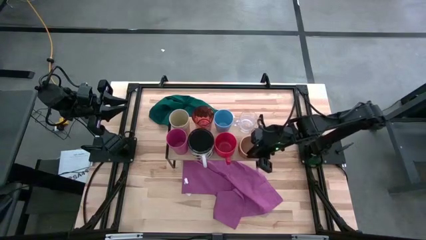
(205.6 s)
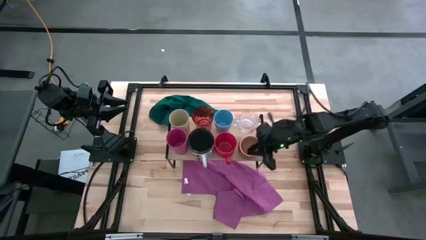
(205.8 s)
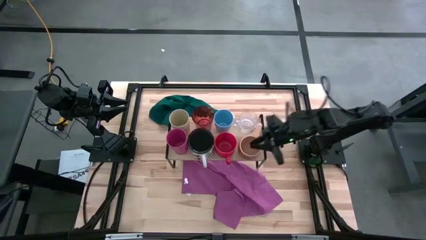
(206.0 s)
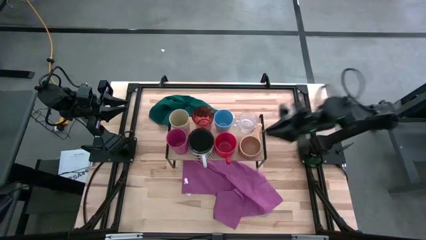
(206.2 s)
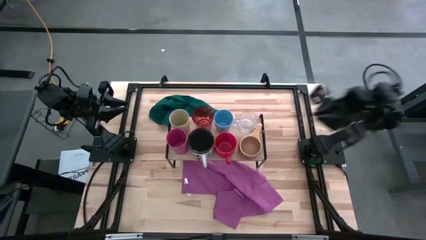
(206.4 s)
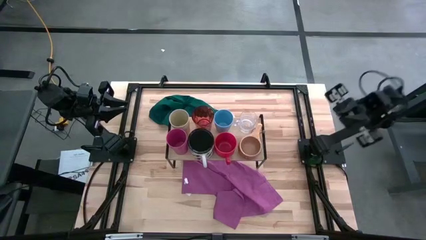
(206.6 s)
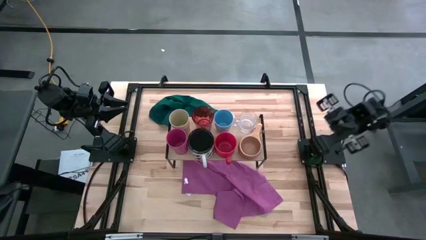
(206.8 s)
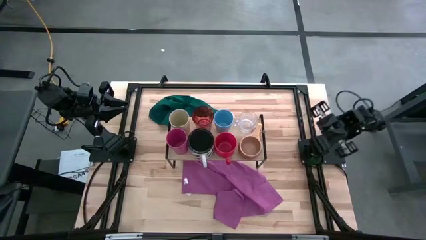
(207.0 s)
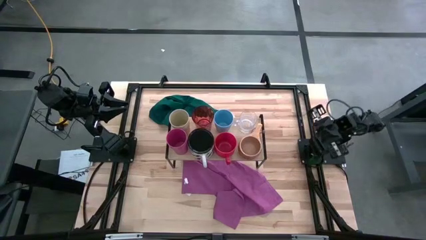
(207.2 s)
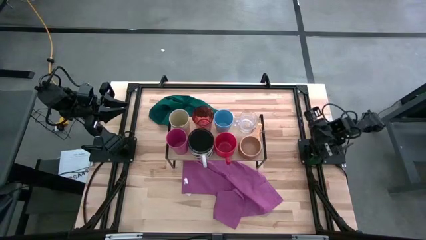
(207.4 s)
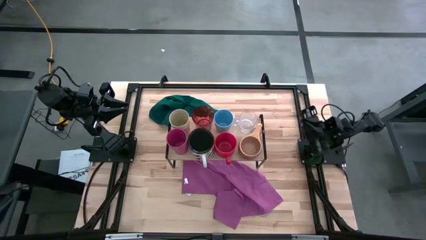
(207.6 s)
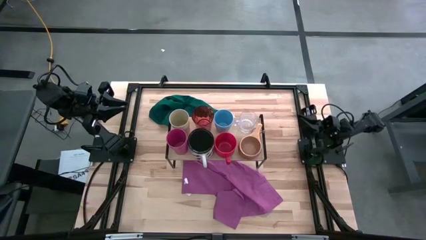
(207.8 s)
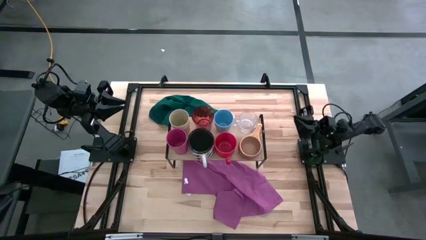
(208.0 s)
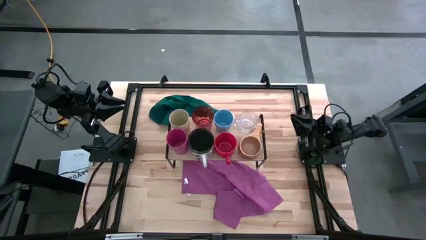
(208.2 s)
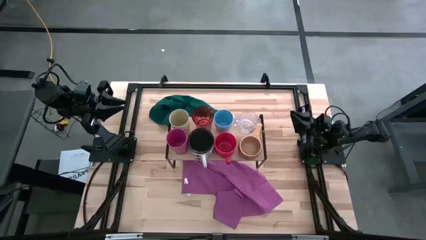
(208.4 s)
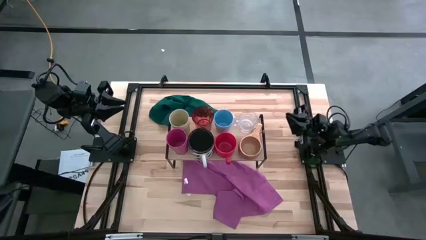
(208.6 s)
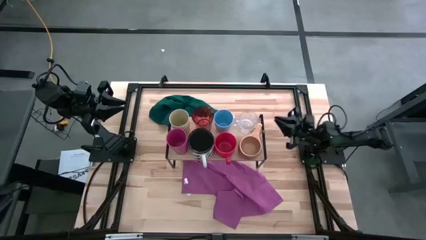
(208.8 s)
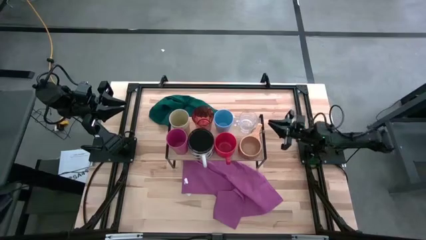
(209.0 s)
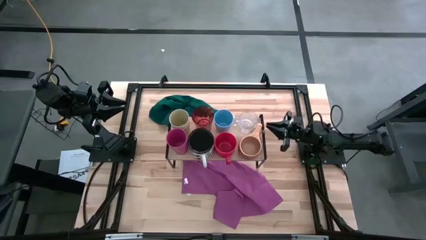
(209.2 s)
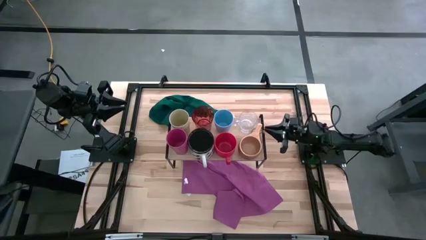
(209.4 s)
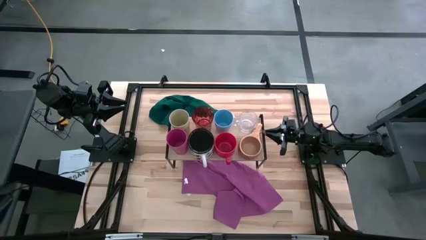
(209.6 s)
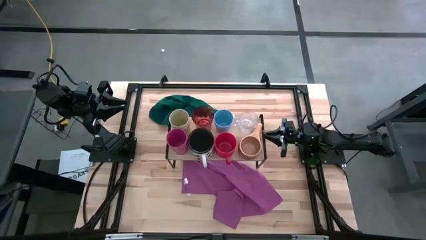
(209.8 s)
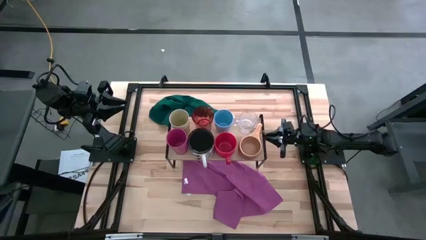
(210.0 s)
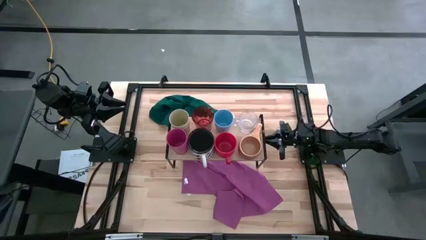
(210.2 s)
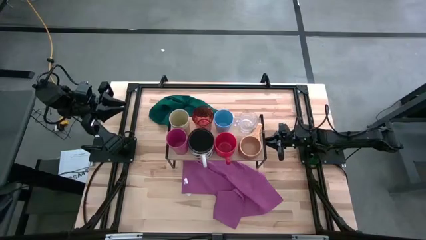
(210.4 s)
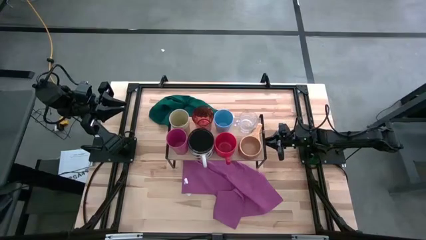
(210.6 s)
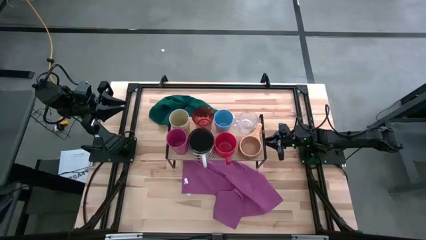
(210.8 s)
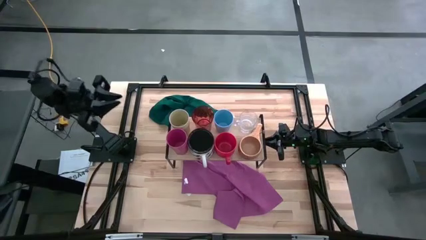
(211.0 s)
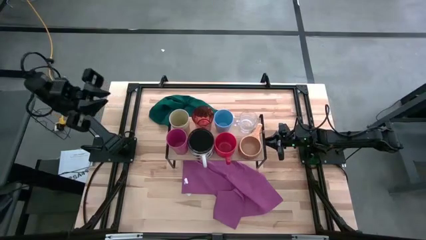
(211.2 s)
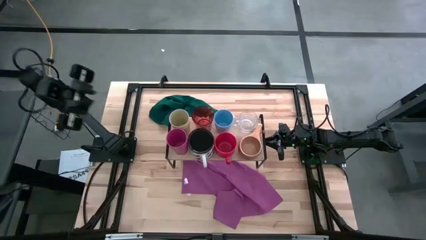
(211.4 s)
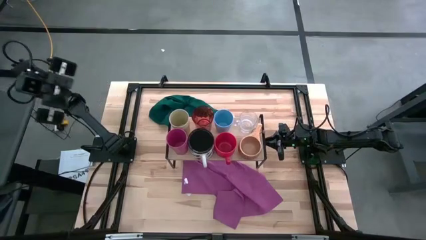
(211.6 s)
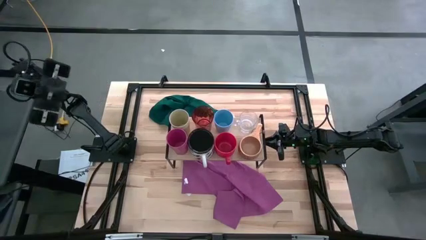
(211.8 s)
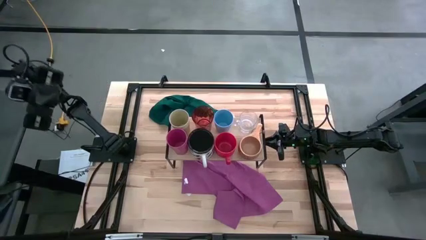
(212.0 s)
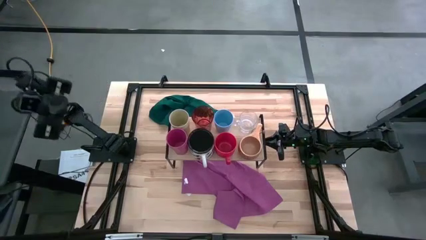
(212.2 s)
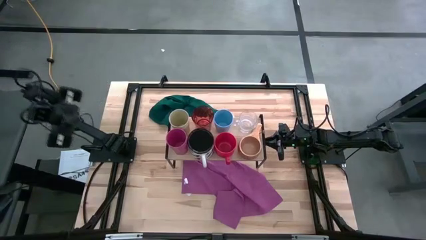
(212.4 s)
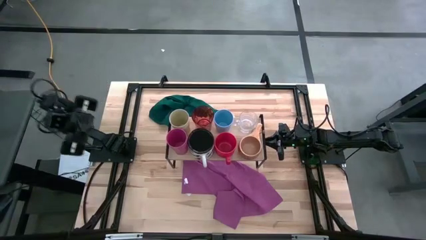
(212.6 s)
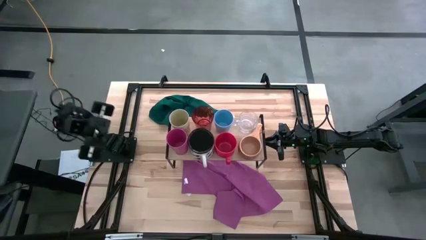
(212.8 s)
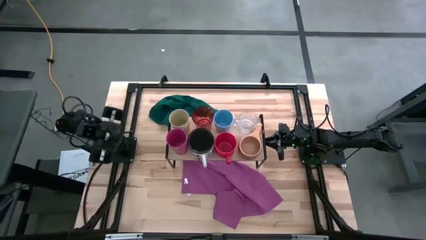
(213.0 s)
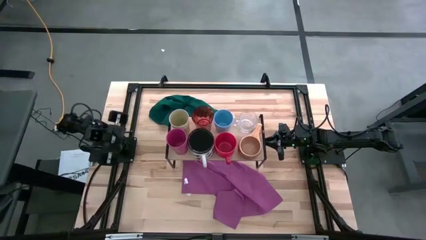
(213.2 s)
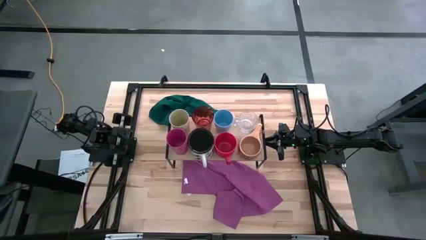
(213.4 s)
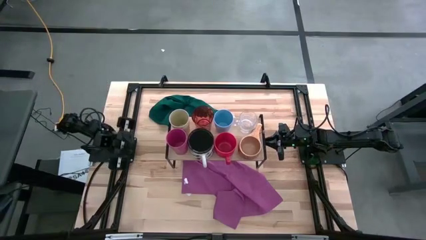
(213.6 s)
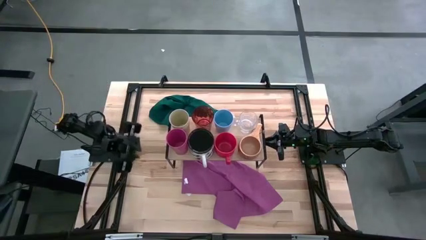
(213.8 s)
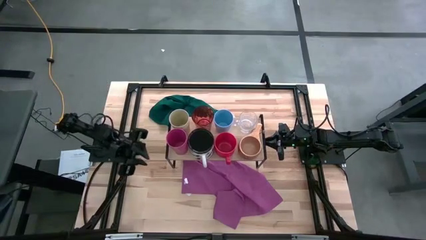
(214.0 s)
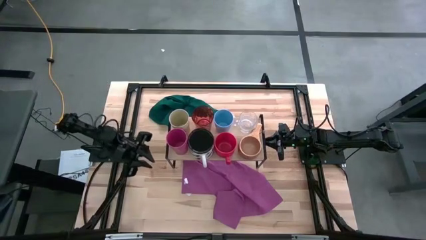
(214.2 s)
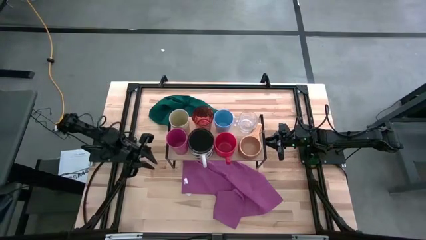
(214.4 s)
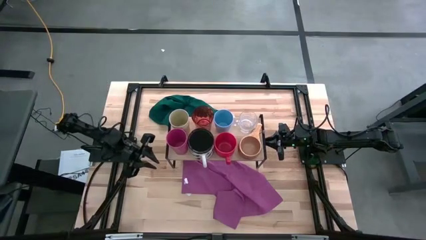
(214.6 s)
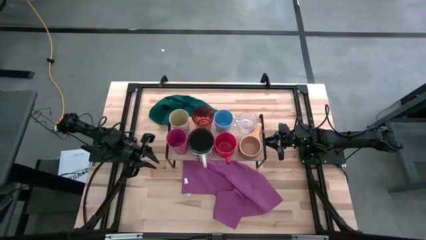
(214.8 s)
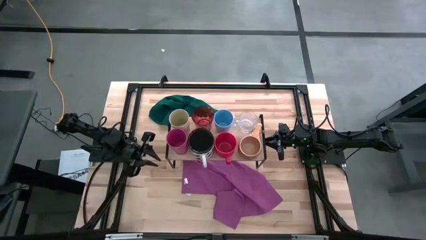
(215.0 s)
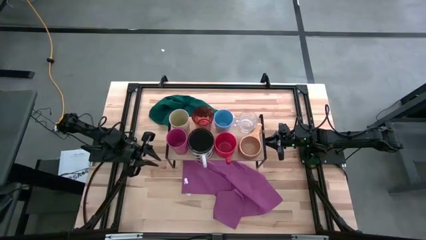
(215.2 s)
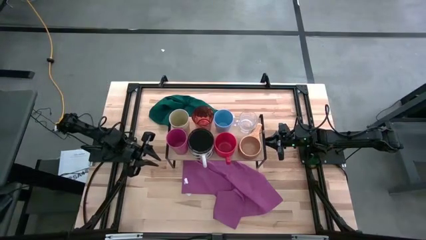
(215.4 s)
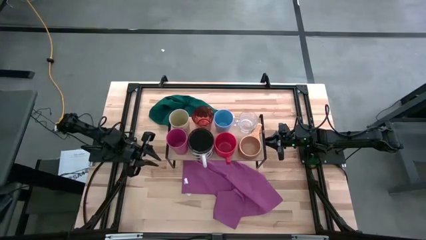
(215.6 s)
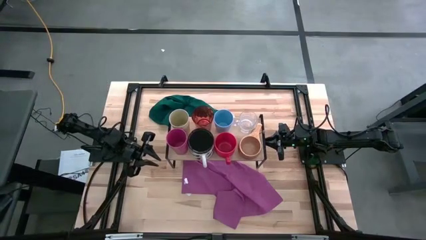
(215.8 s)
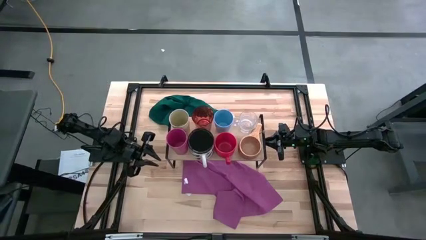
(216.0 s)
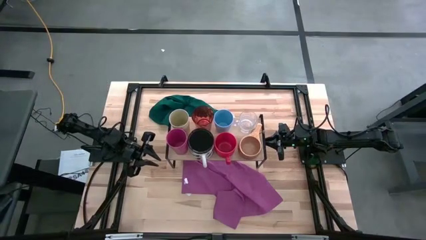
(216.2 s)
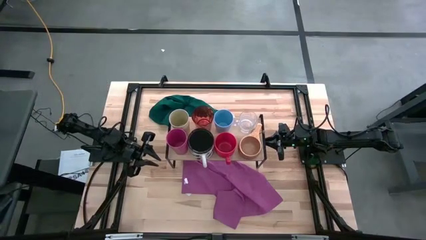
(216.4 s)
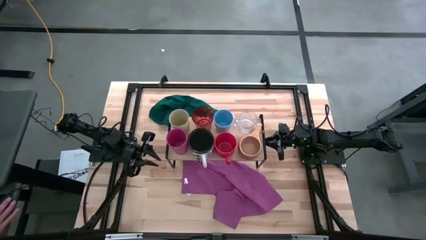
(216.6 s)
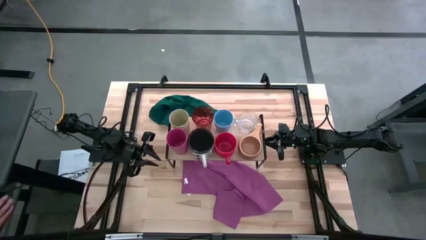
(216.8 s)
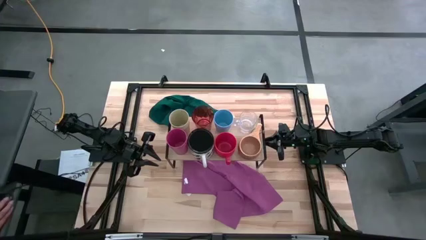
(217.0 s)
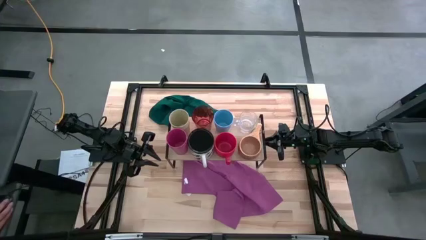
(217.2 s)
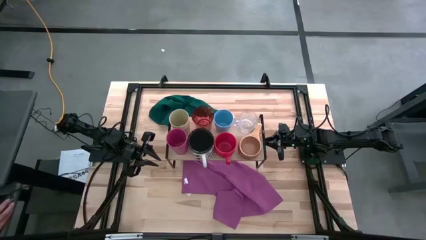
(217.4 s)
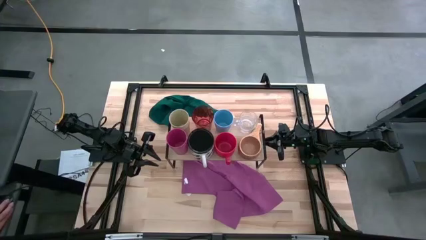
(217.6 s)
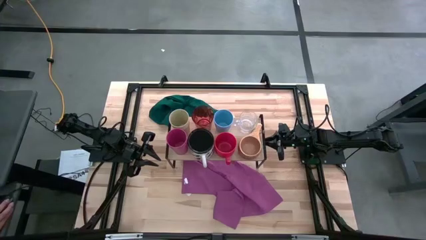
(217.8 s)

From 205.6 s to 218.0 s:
Task: Stack small to large cups/mugs on shelf
Return to Home Position

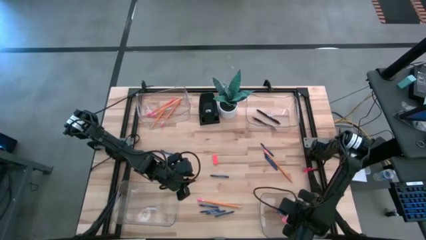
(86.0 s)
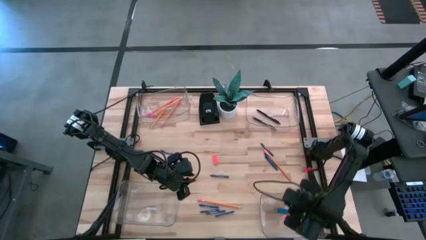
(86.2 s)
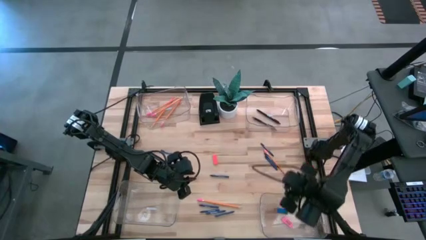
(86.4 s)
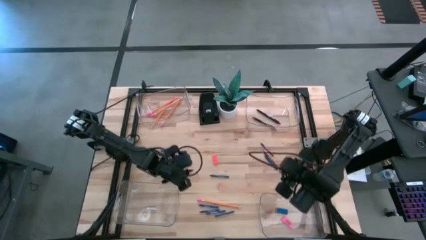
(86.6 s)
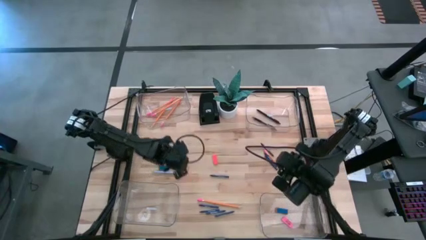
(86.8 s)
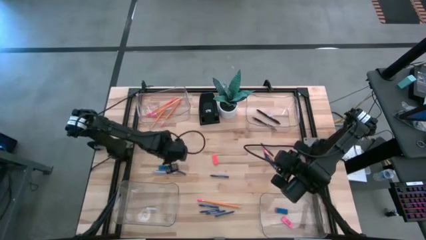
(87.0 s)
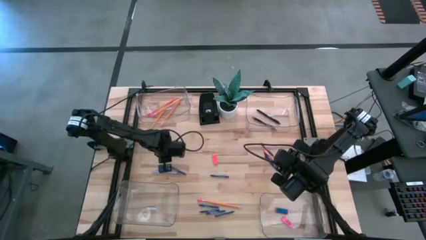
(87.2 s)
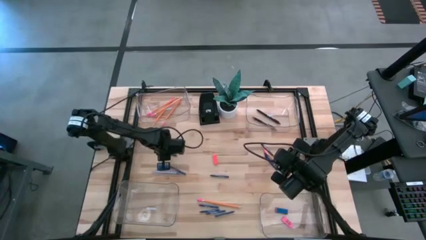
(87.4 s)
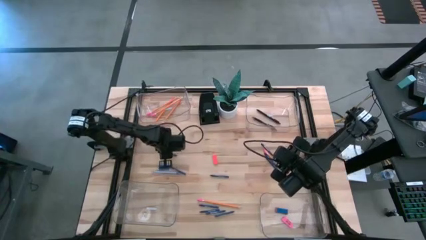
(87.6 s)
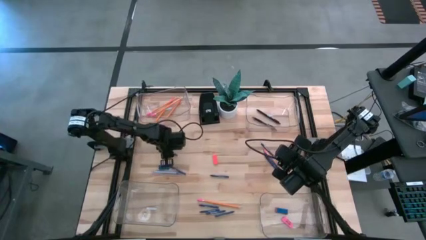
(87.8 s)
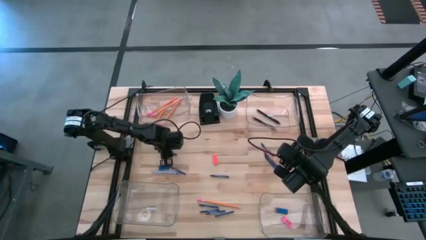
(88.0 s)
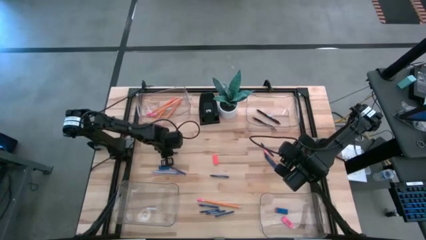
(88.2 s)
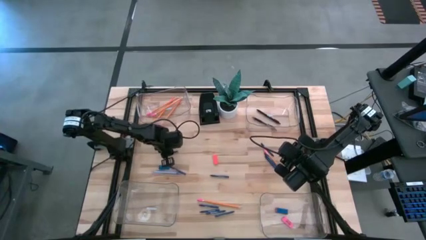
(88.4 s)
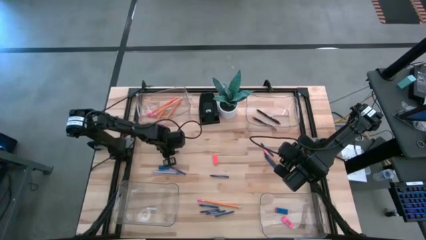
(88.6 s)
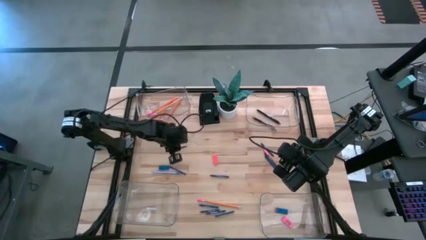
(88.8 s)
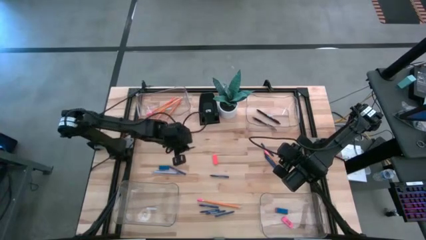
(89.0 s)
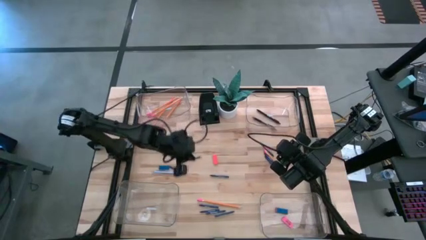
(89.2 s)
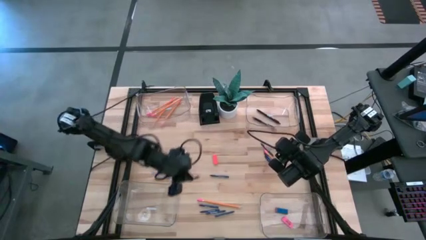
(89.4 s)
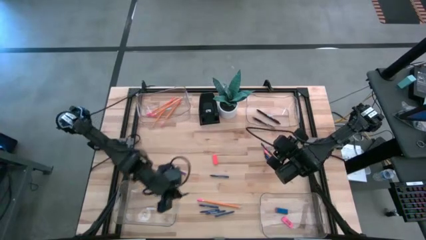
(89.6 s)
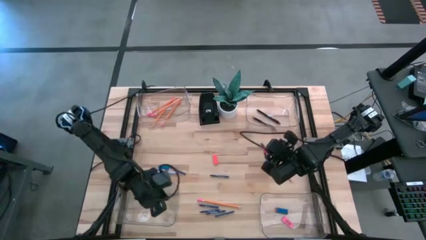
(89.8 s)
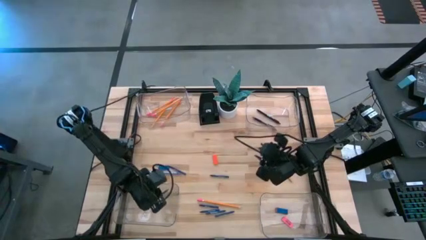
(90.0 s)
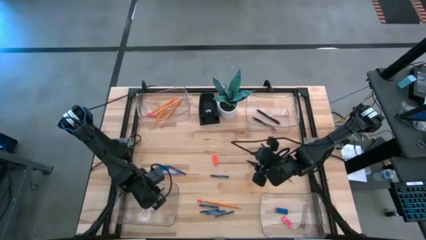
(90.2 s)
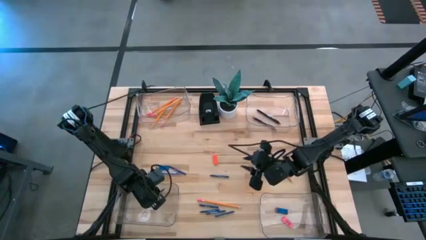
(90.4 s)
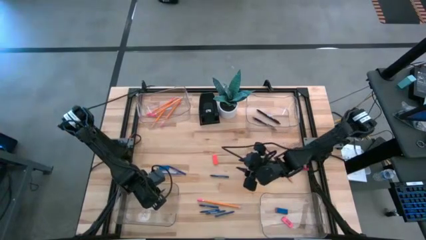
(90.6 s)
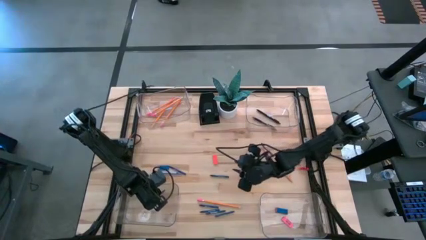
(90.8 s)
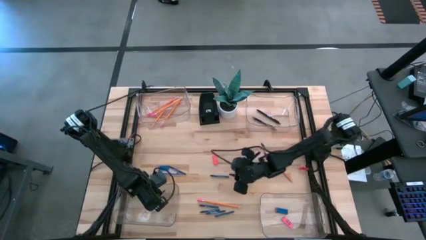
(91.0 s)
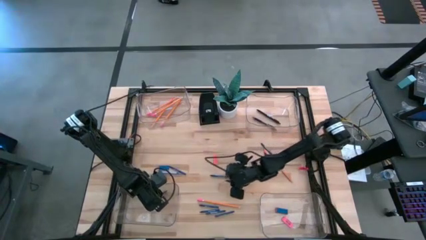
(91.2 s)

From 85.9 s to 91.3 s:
Task: Sort crayons/erasers/pens/pencils in bins
Put the blue crayon into the bottom left transparent bin
